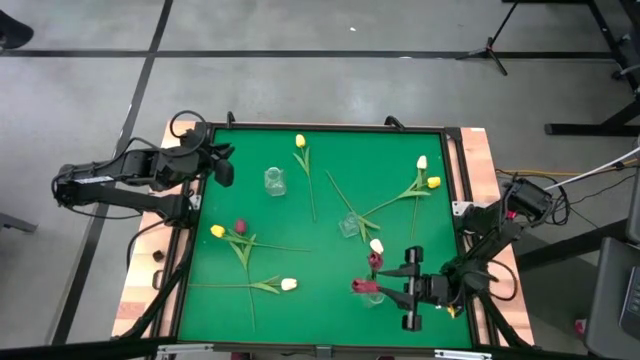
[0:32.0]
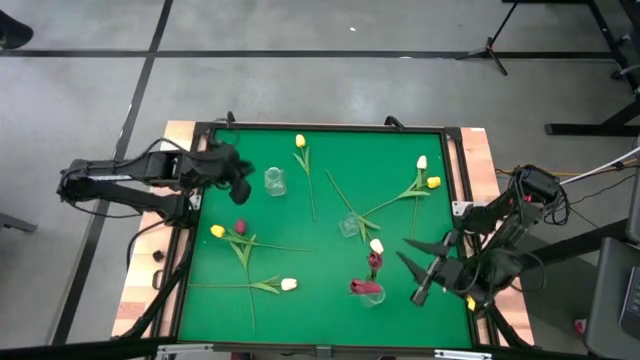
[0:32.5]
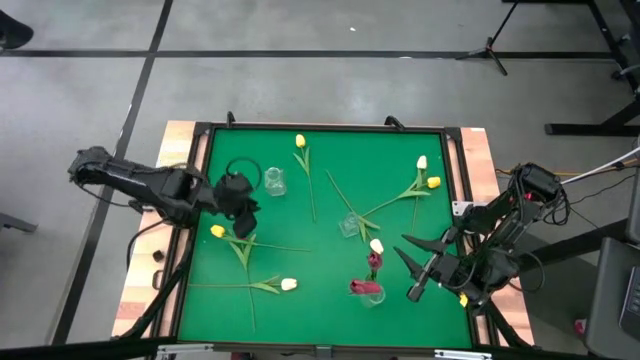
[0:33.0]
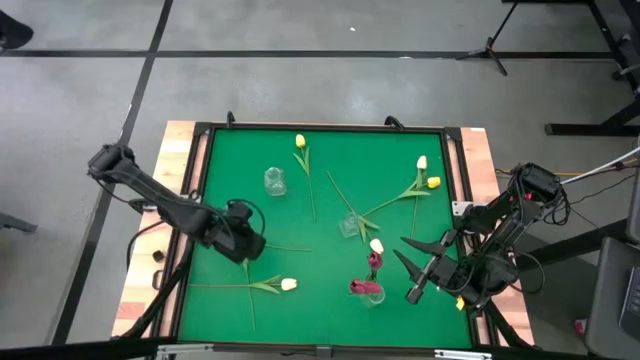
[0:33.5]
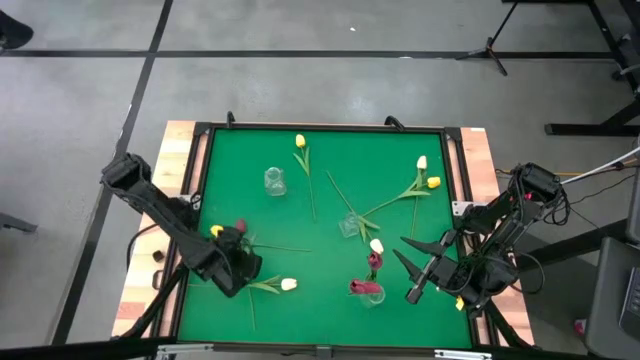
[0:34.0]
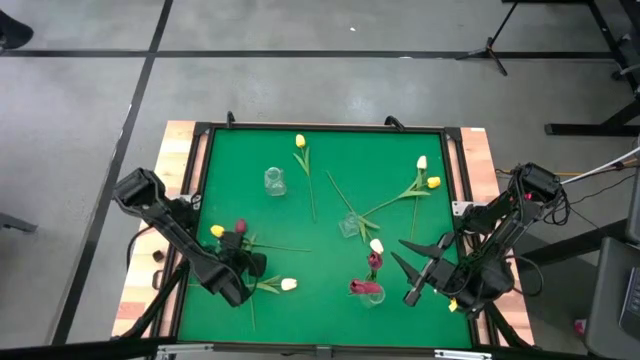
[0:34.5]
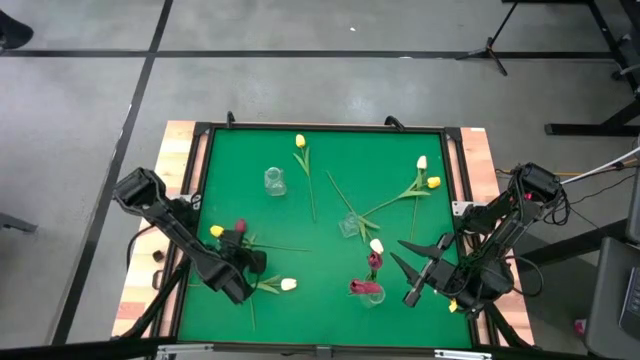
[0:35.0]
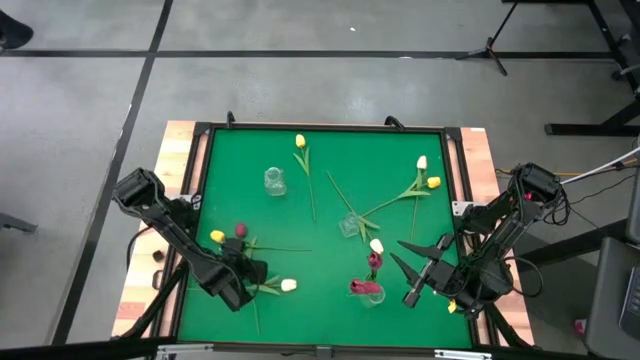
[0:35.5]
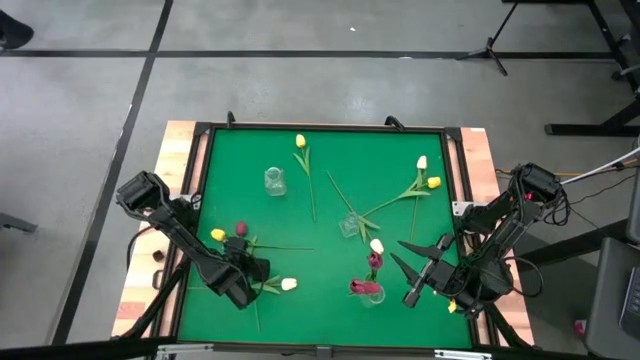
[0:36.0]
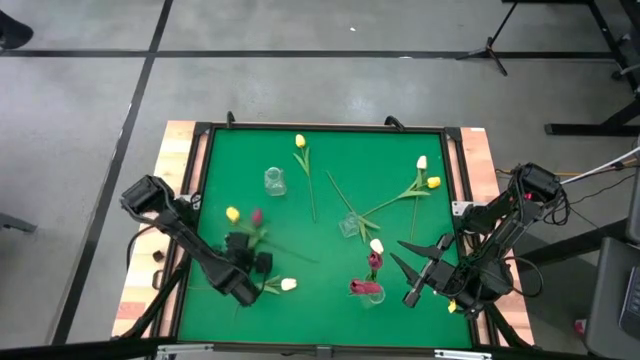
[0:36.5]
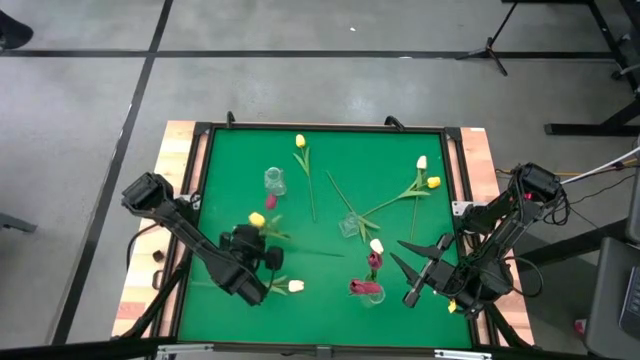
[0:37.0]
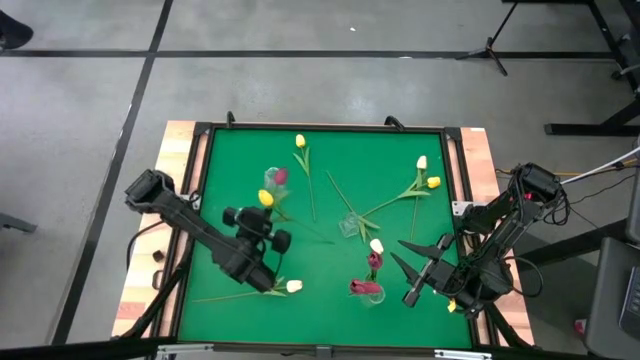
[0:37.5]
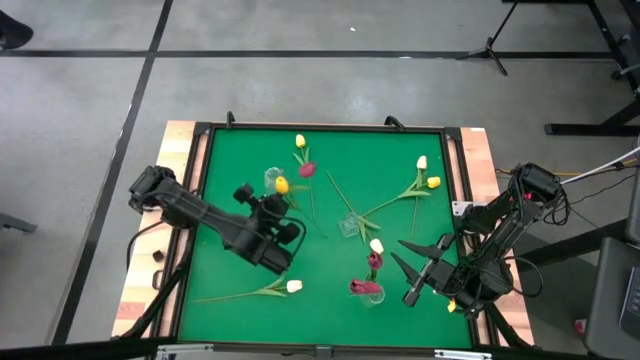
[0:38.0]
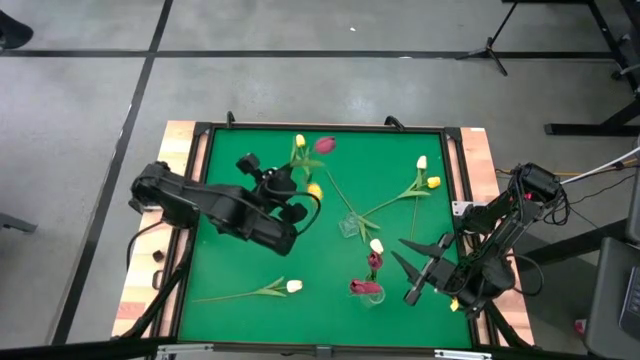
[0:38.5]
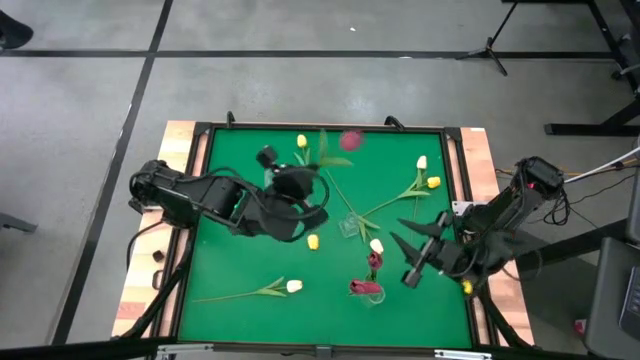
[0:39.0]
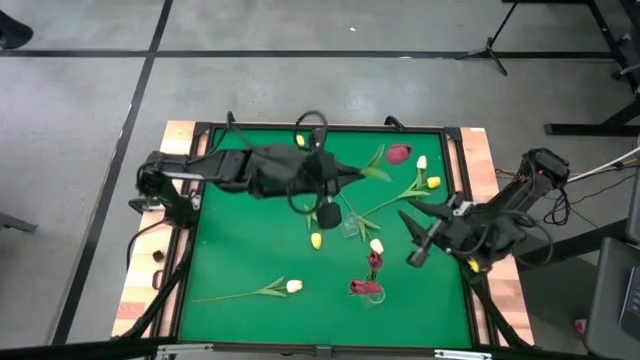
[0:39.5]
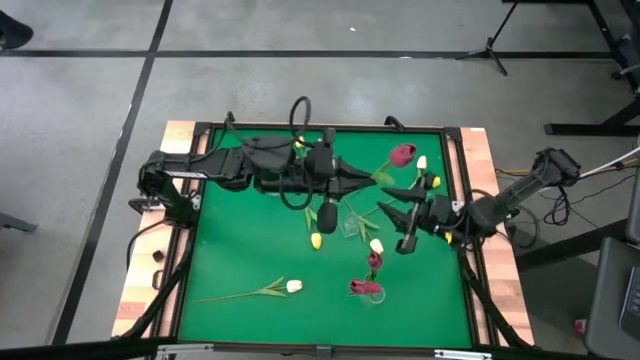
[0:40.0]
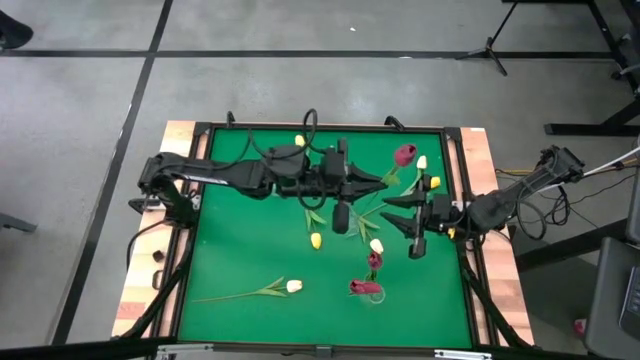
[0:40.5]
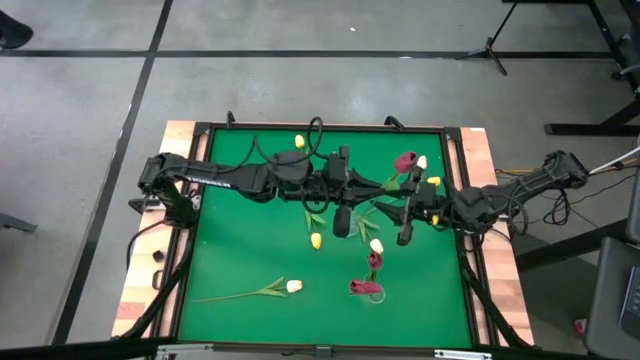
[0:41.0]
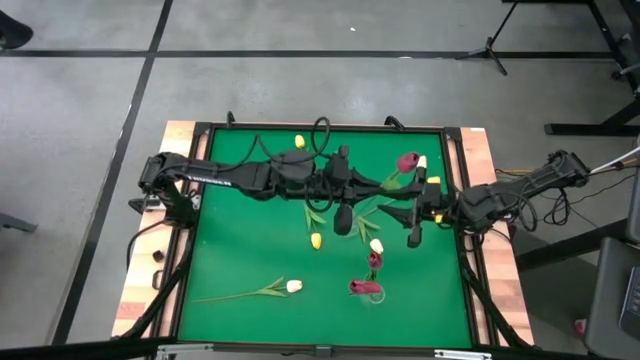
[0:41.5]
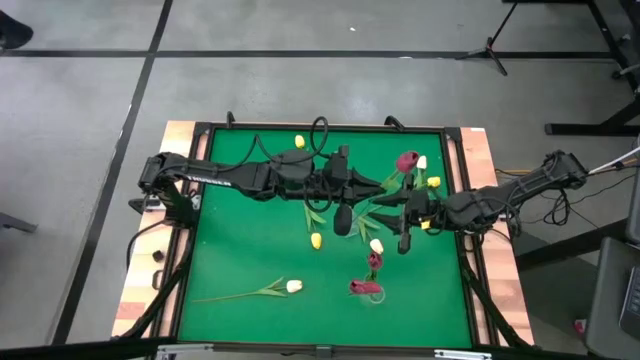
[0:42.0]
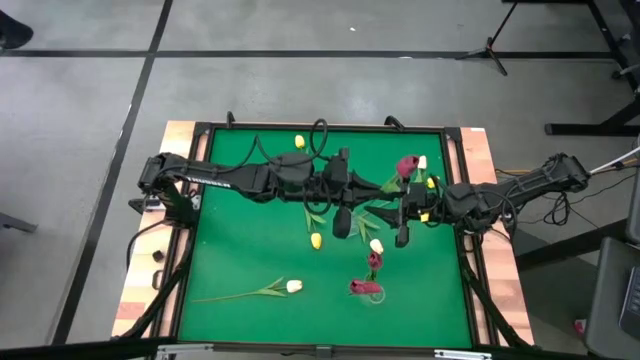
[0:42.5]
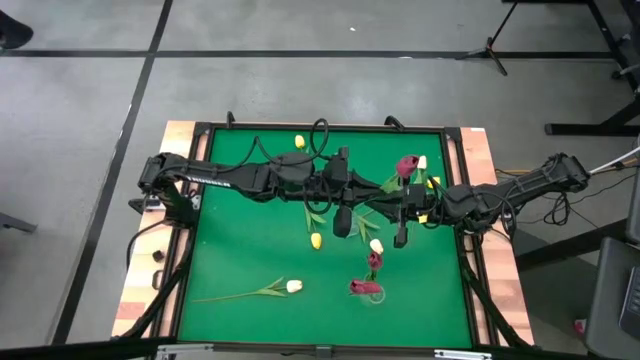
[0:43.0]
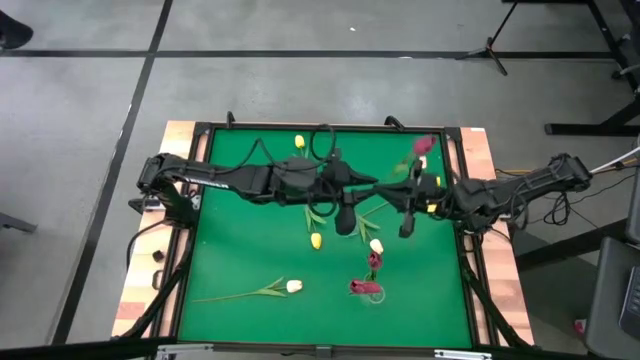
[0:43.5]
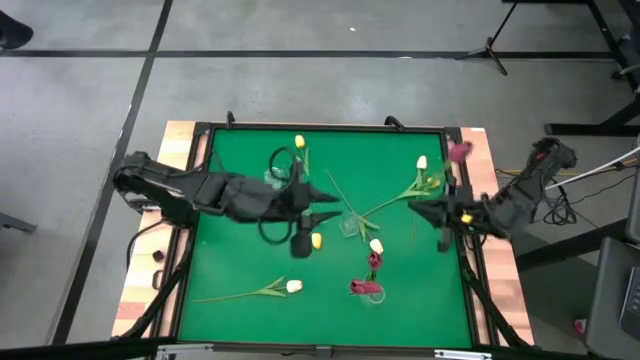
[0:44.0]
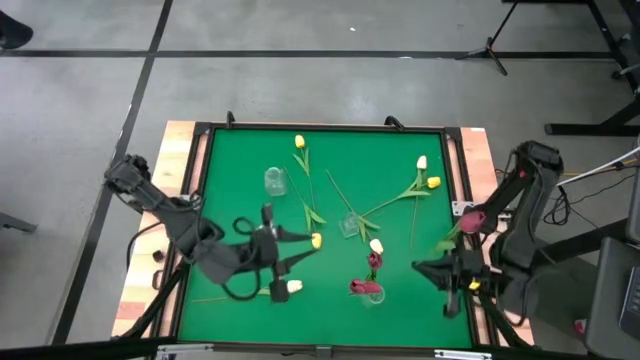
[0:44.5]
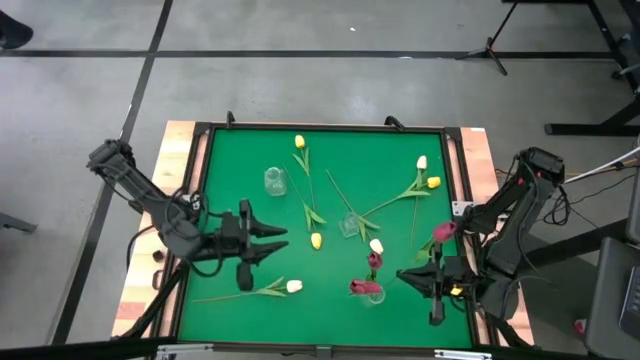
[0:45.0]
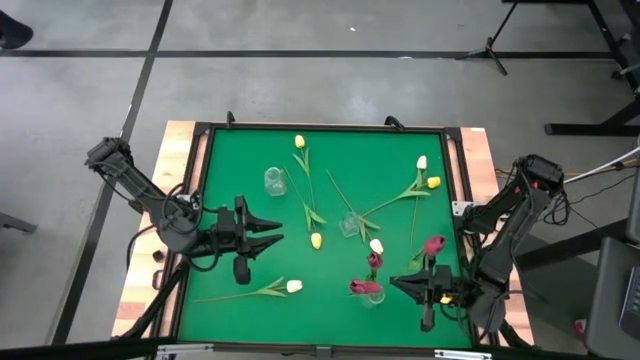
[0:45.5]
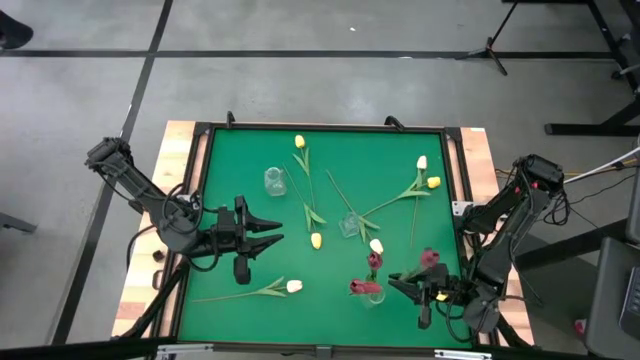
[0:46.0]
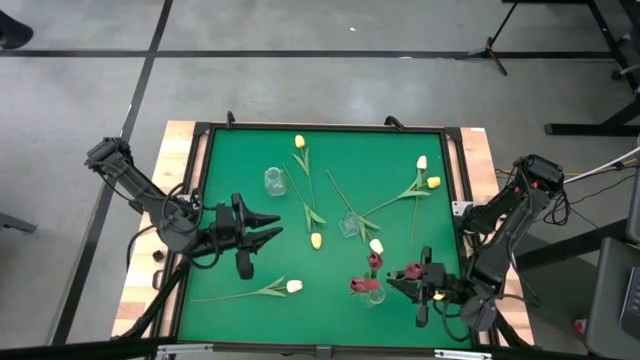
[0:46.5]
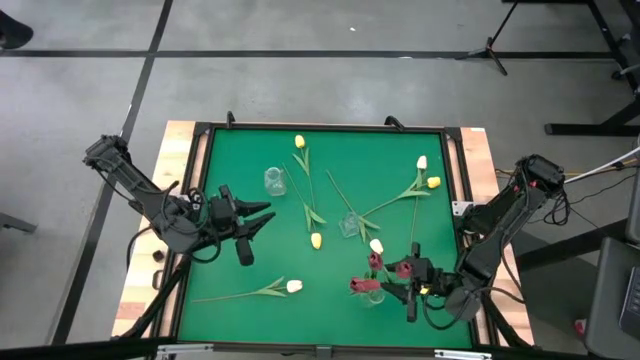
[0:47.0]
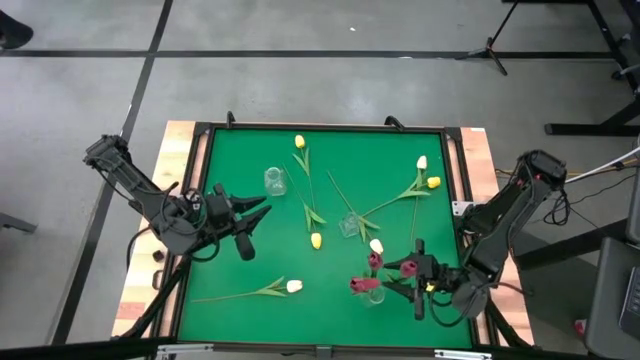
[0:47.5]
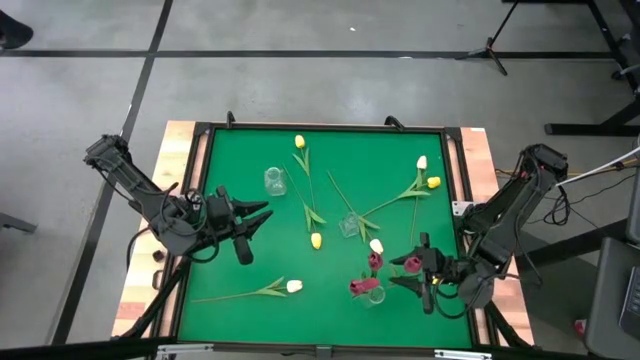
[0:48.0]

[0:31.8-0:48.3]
Task: Sort flowers into vase by color
Put the red tulip into the bottom right transparent vase

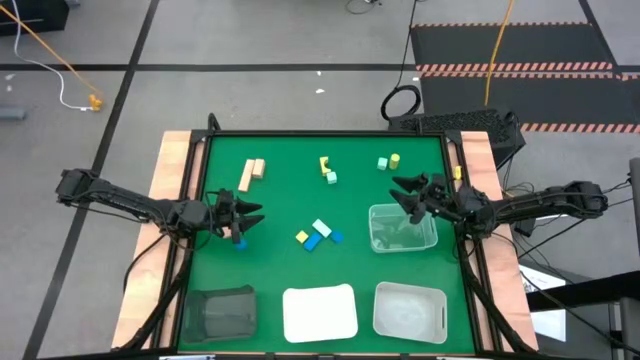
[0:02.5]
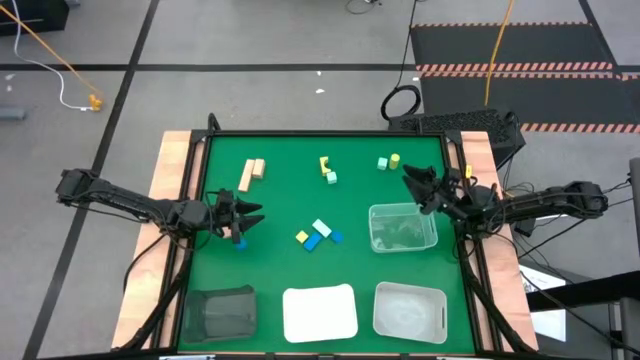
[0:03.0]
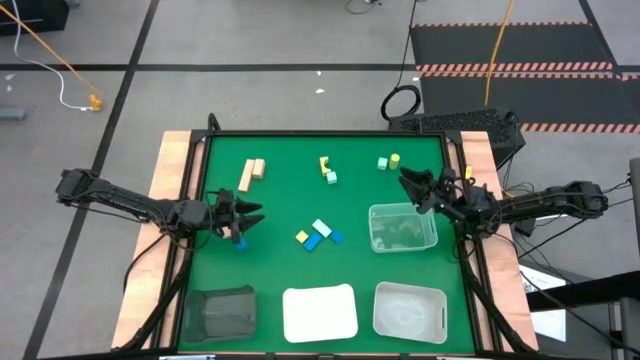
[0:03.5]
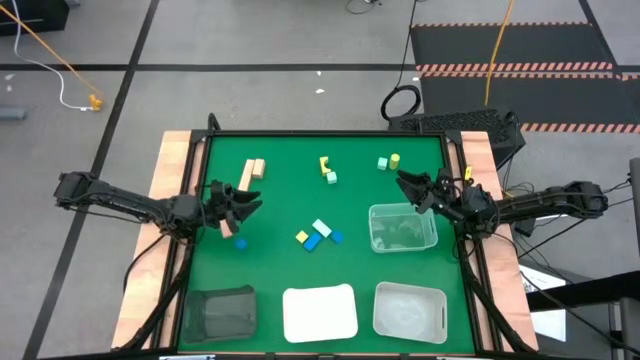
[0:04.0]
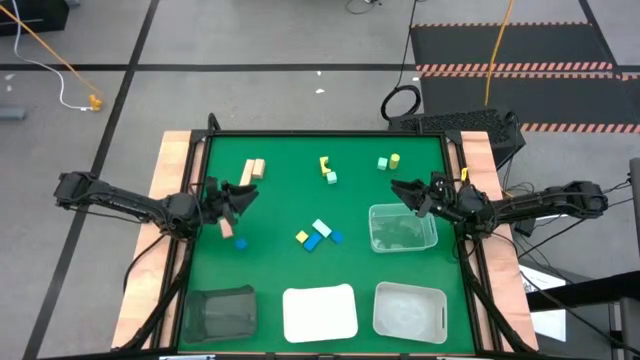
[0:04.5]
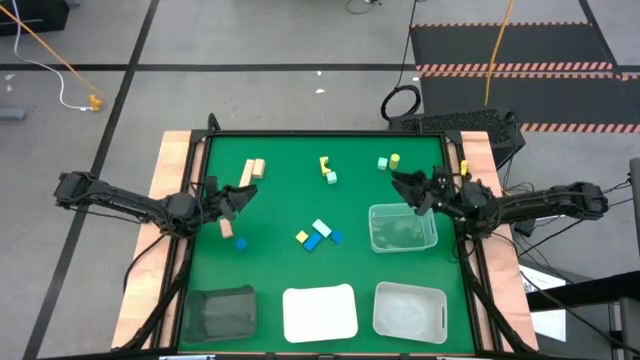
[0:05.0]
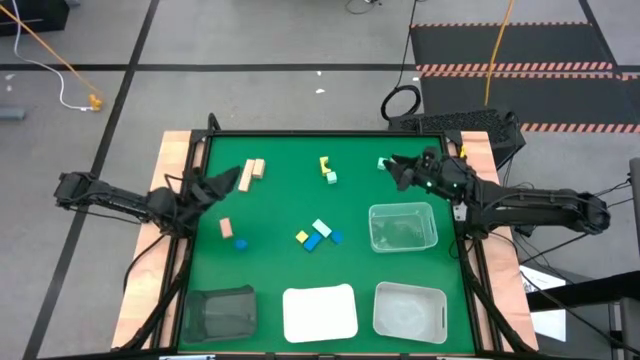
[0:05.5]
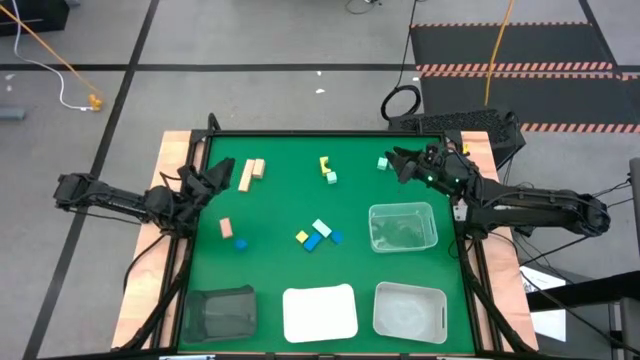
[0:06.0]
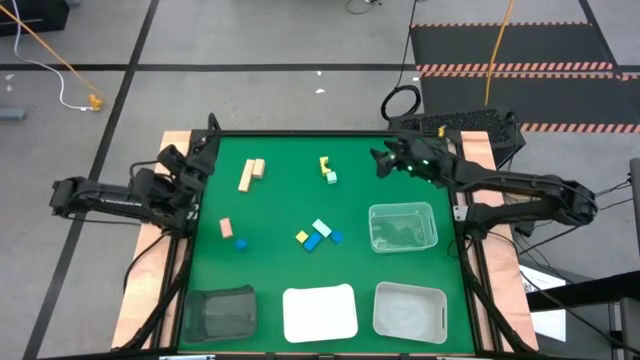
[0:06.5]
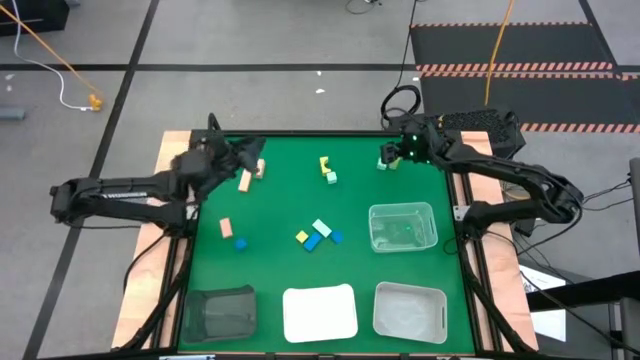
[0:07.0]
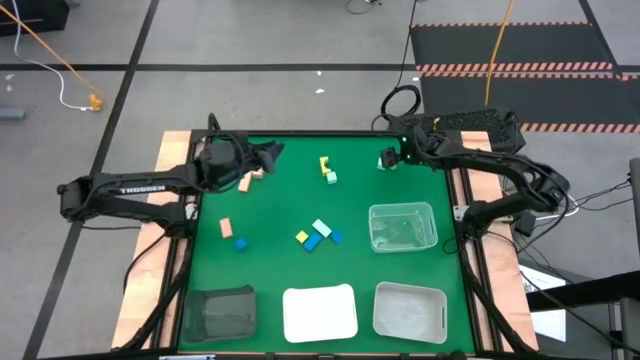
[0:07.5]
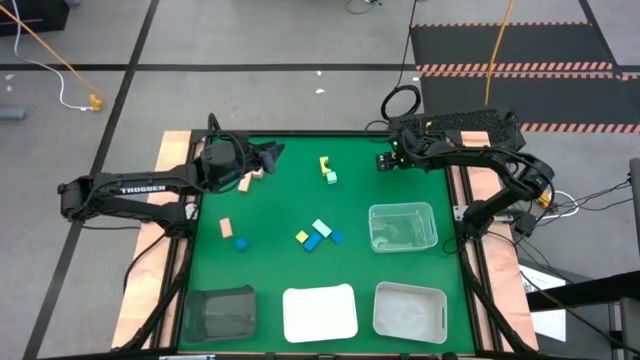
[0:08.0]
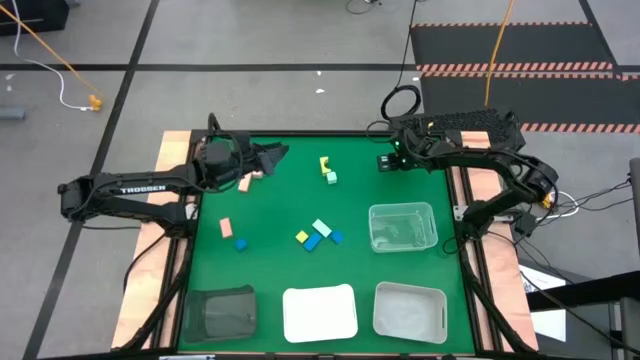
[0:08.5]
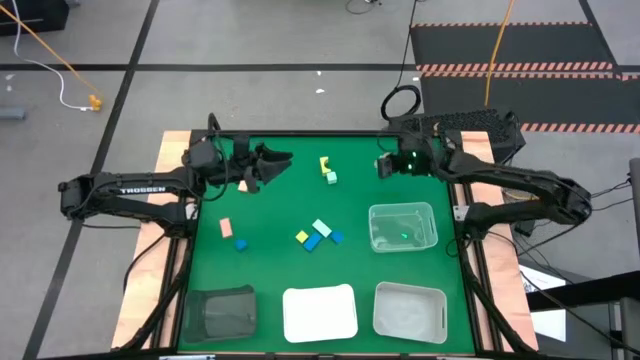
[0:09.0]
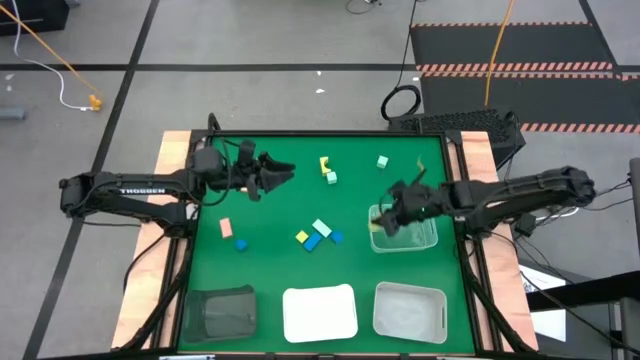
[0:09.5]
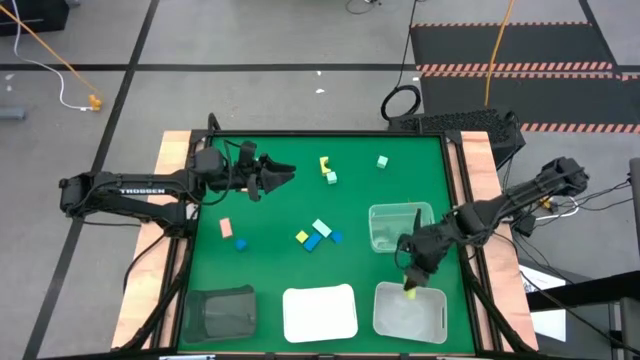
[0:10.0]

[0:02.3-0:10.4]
Task: Sort & place blocks by color
Put the top right green block into the gray bin
